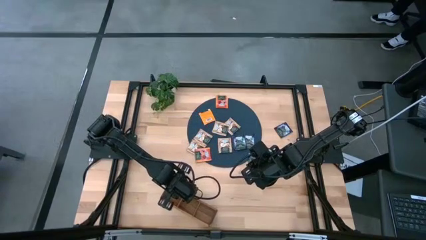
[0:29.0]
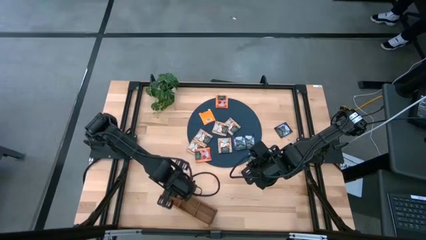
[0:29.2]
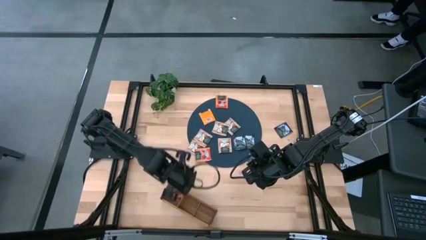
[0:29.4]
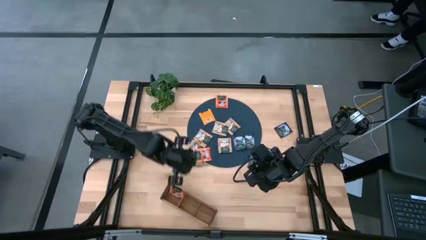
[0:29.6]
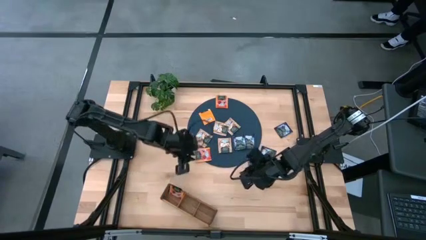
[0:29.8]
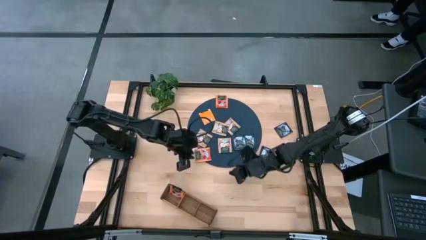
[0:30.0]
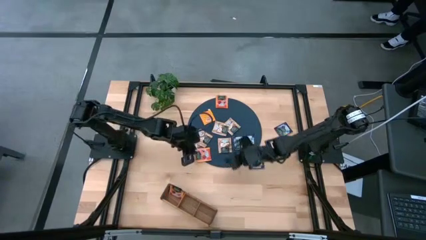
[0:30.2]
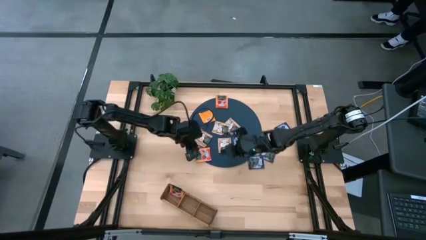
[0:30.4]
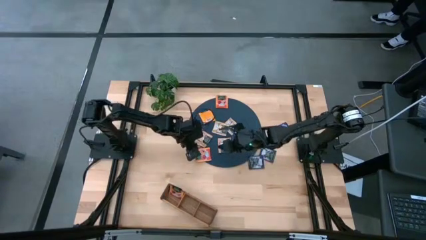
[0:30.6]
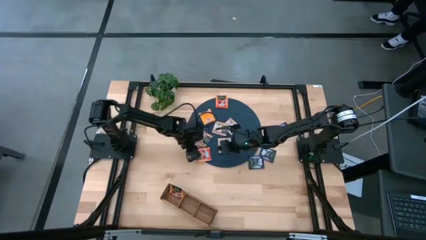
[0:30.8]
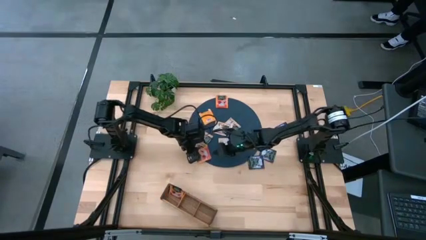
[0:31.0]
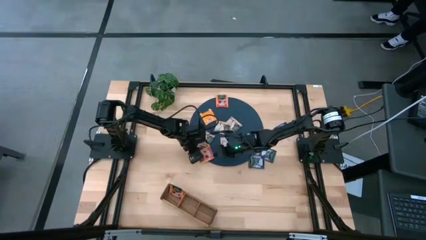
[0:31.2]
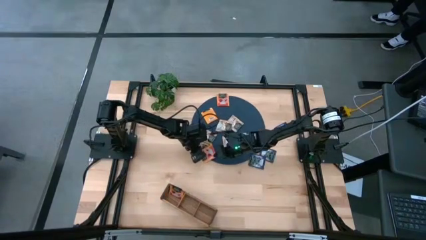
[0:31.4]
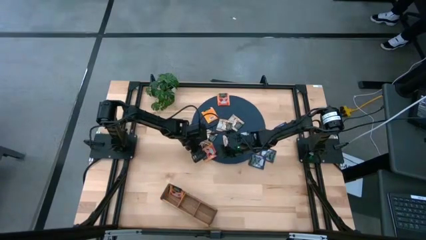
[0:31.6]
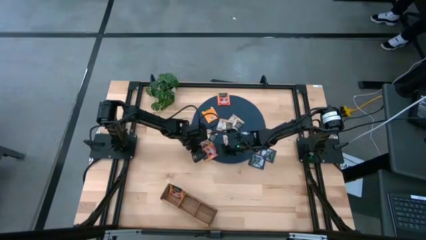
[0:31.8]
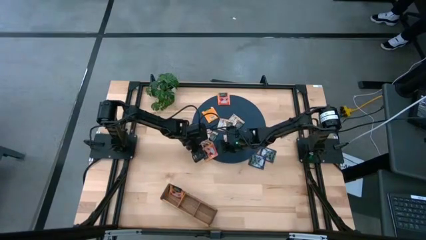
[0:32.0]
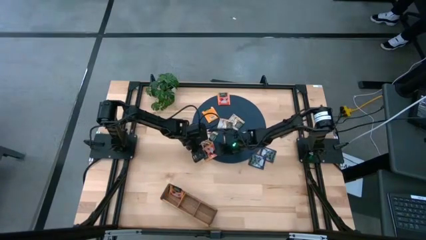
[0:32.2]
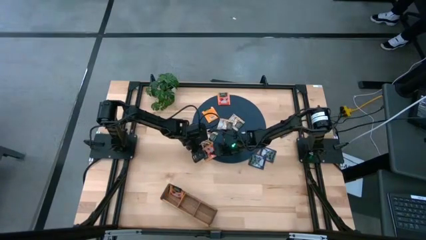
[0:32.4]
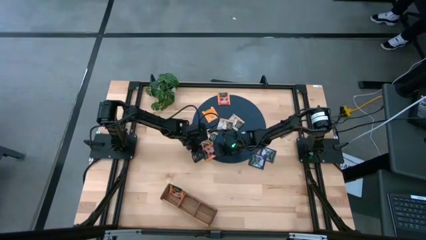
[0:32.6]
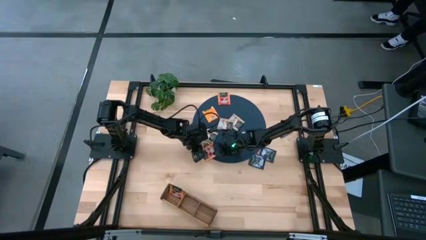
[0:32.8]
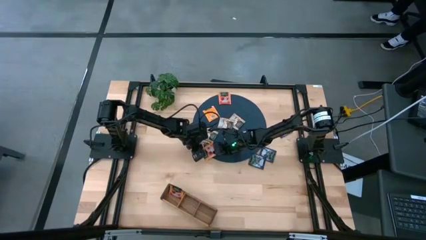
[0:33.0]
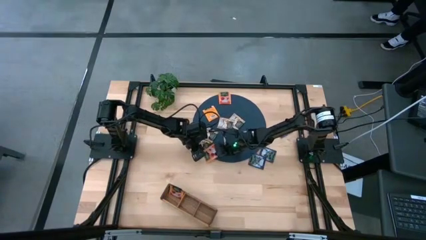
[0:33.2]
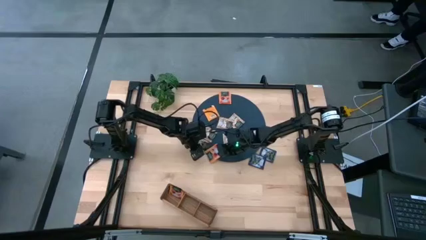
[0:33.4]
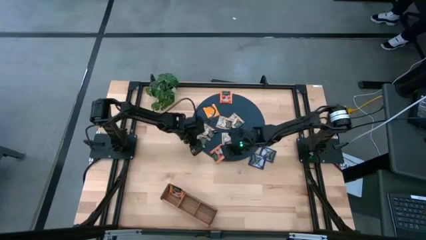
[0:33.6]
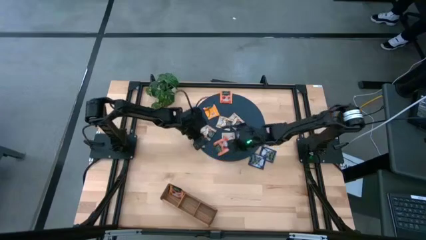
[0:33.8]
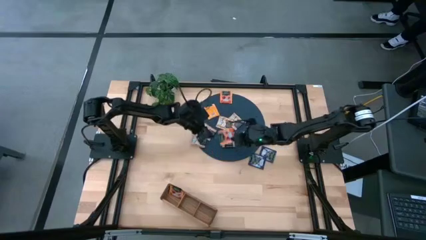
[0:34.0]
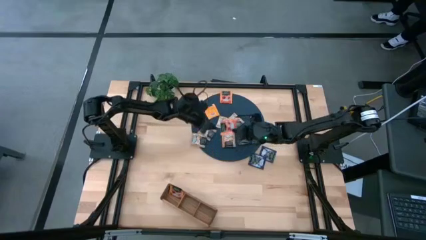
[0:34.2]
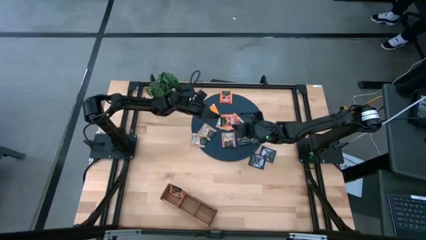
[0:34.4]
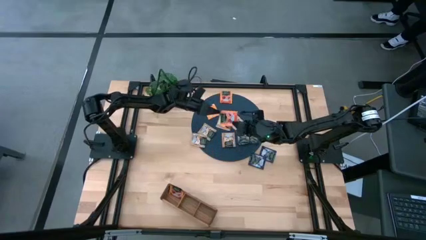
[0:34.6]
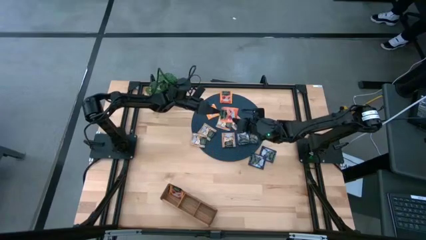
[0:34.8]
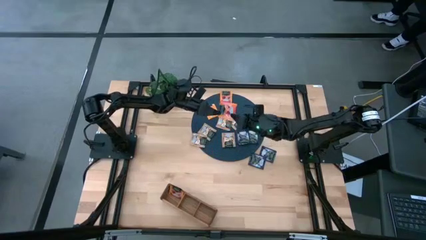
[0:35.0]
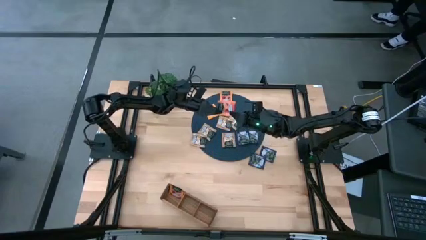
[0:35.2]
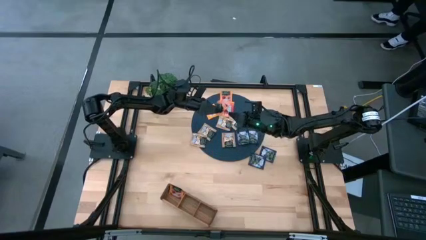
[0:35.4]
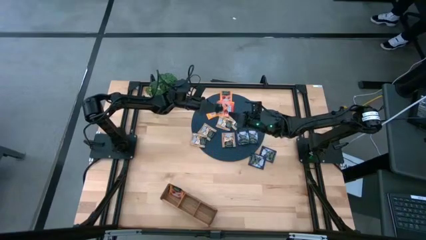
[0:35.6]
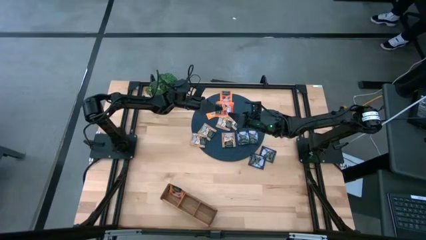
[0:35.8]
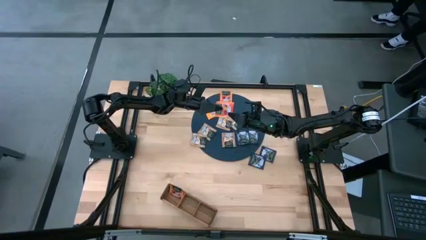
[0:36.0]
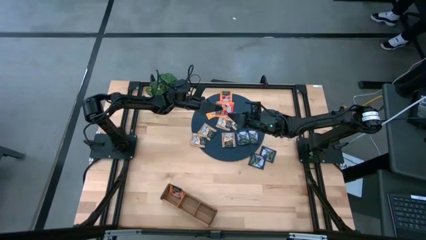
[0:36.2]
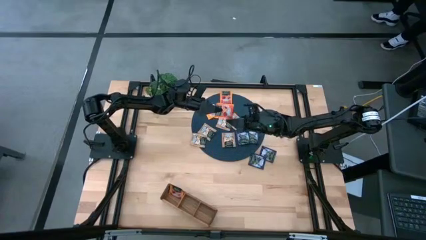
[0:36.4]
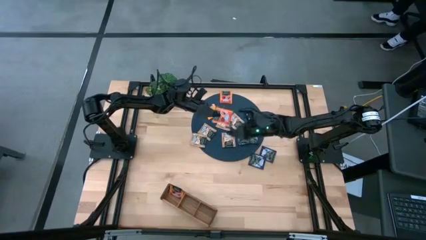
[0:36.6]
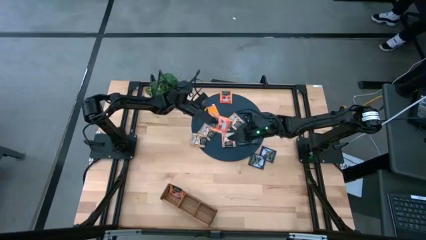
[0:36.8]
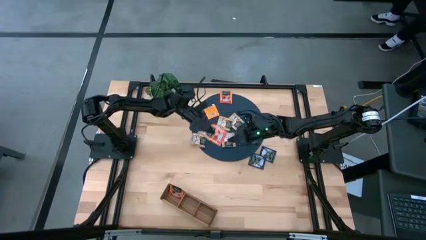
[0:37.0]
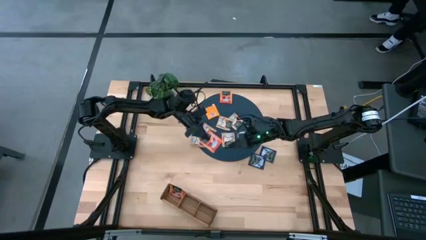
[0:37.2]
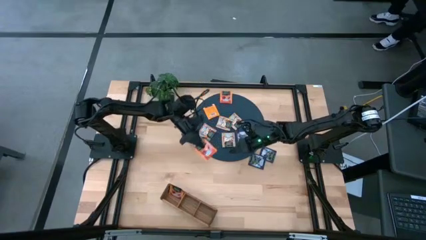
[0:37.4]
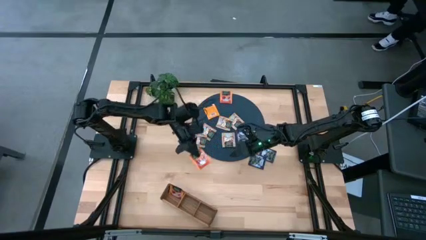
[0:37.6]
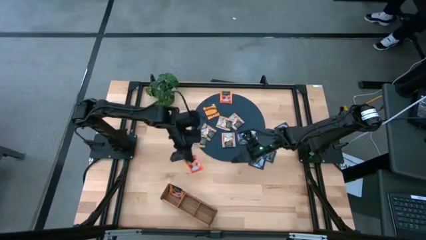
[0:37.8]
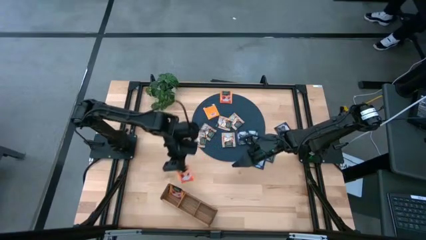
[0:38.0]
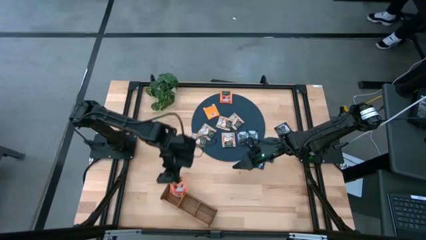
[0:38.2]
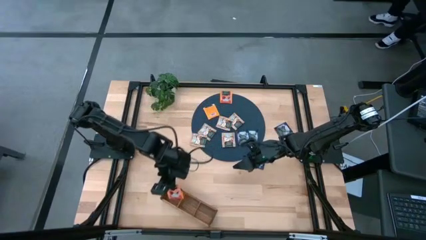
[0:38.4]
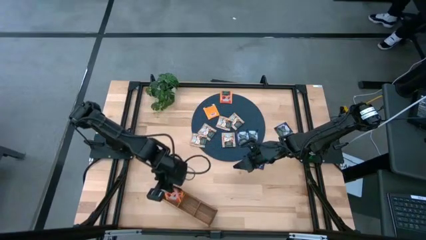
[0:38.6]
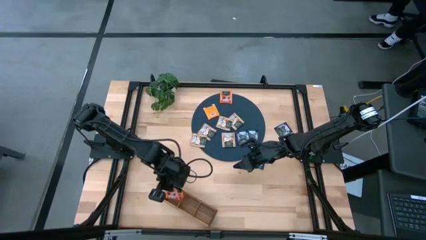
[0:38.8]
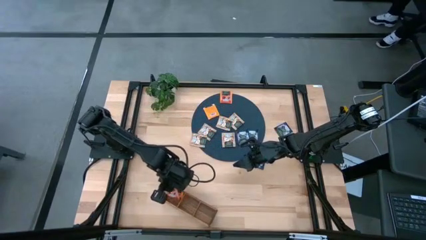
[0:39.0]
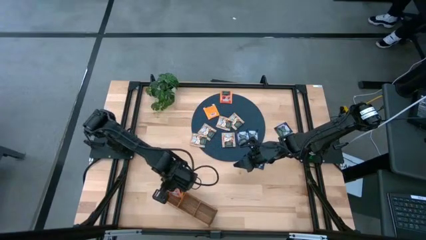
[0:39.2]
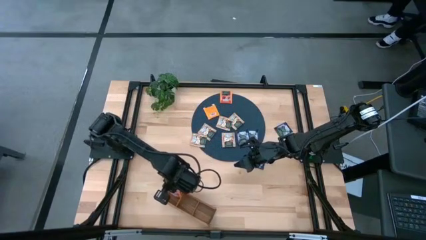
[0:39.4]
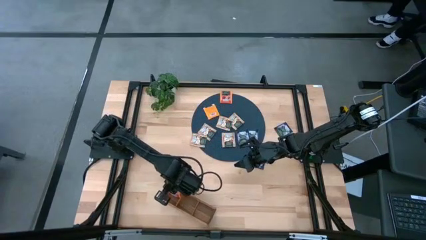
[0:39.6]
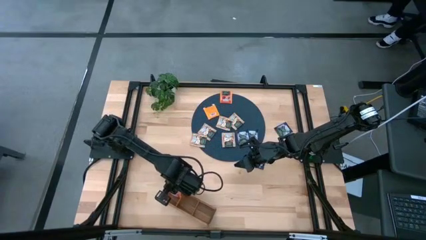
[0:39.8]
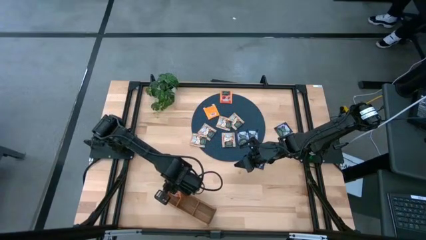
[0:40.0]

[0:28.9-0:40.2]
Task: Pick & Place Tea
Put the orange tea bag into the left section of the wooden organizer
